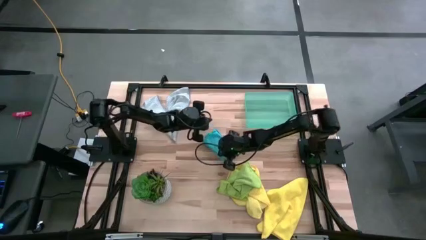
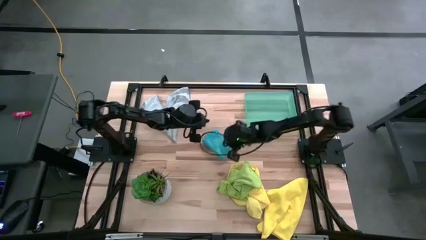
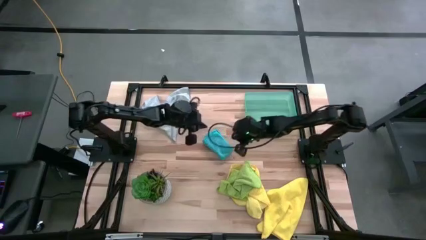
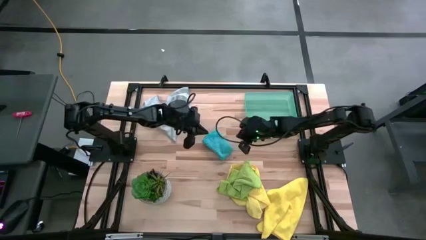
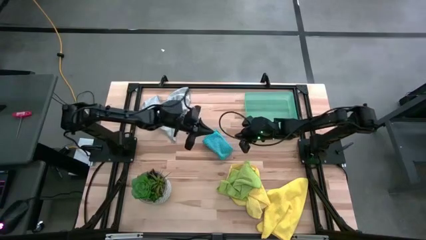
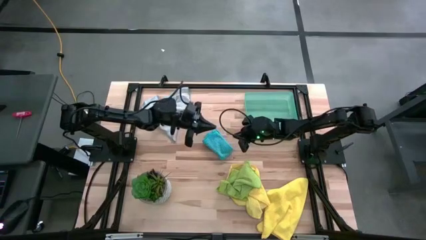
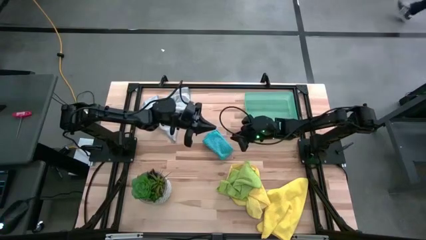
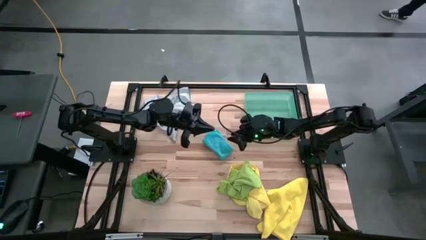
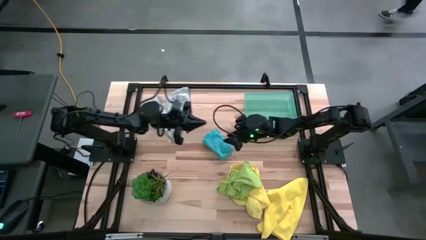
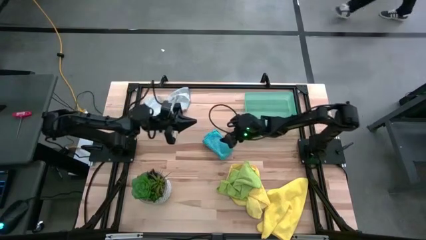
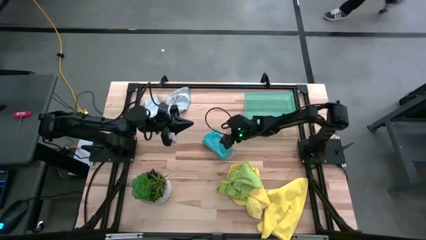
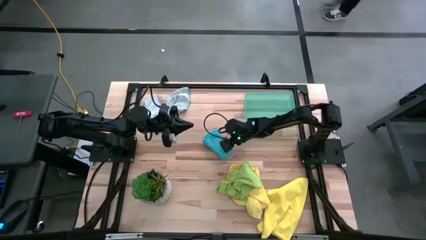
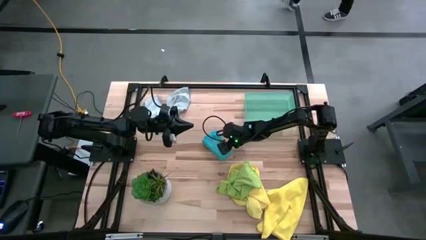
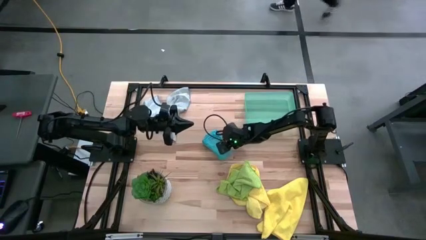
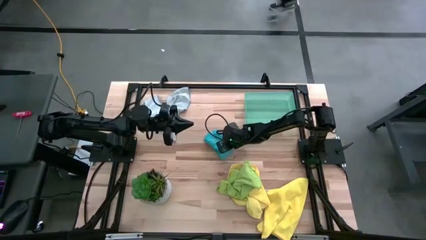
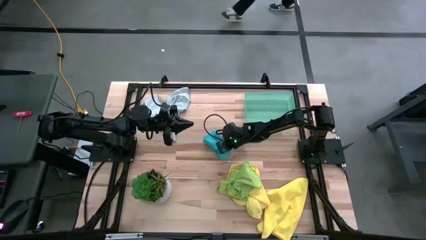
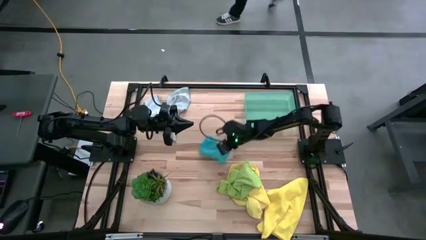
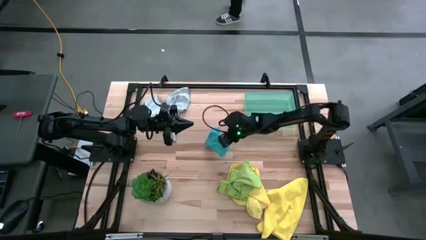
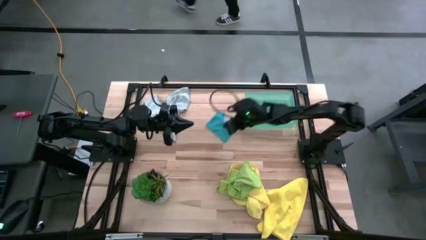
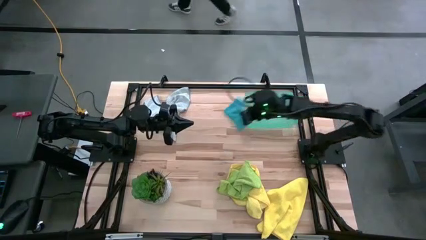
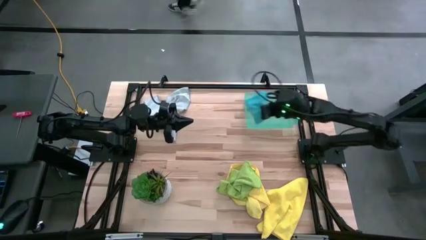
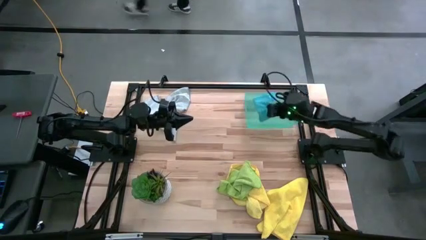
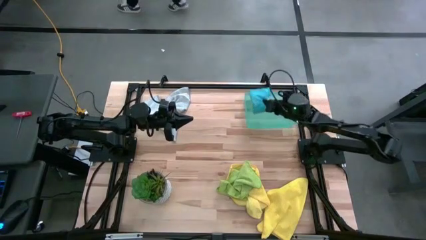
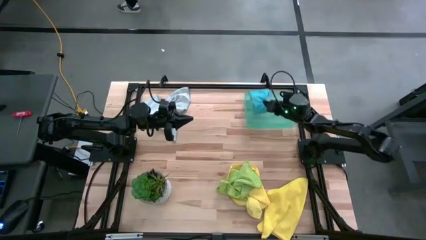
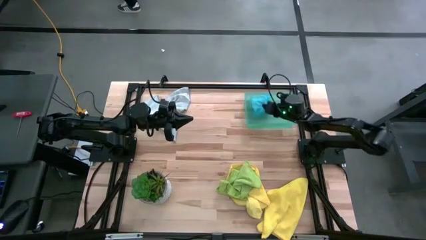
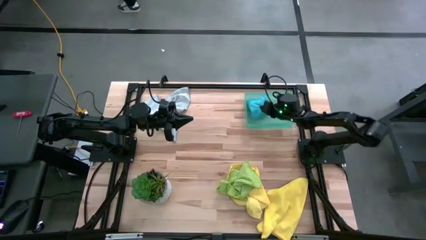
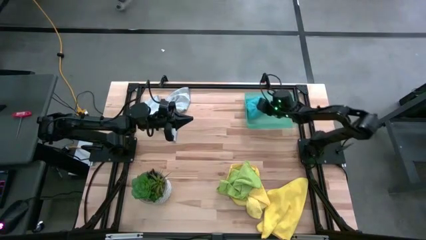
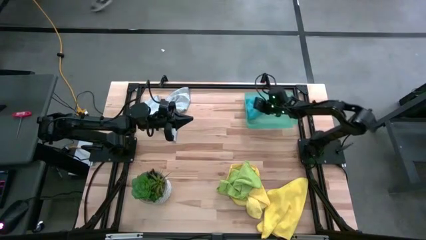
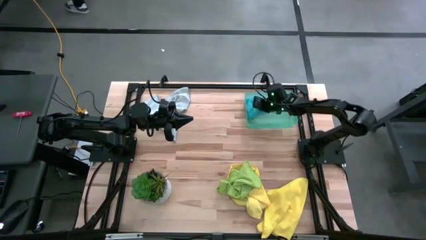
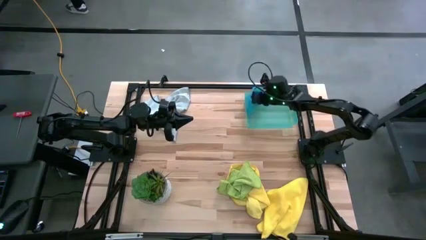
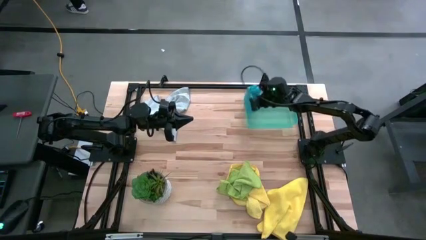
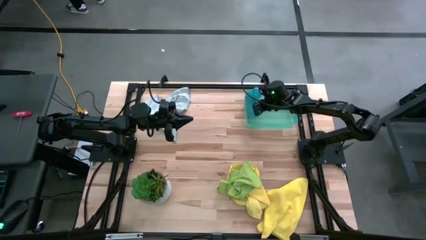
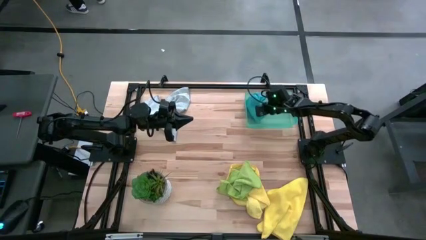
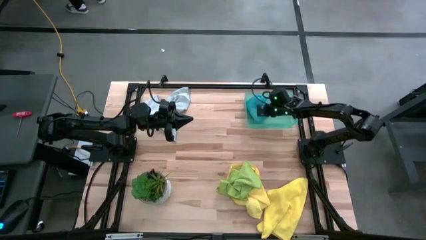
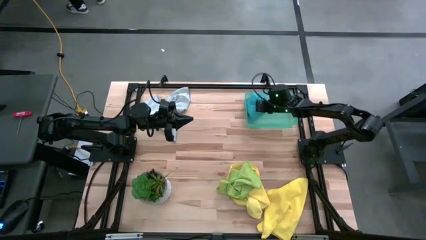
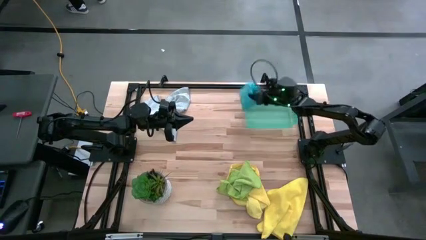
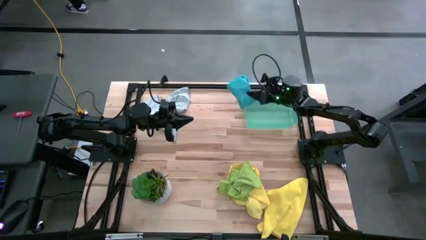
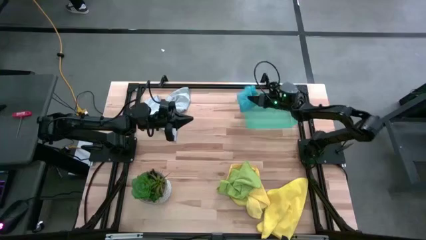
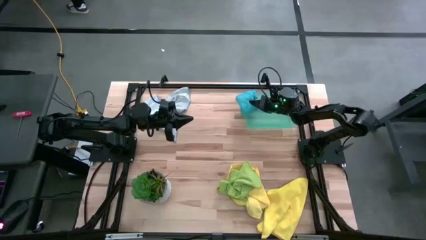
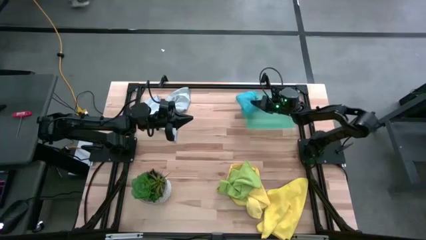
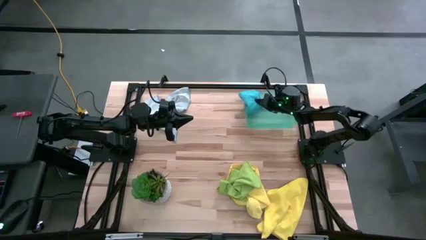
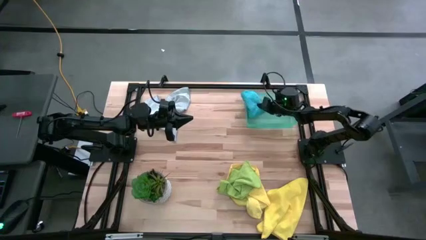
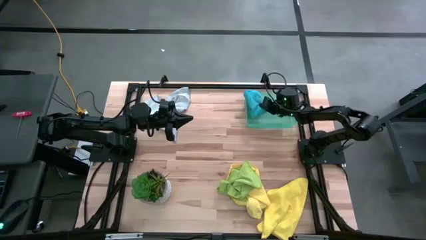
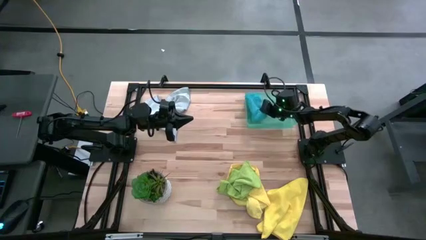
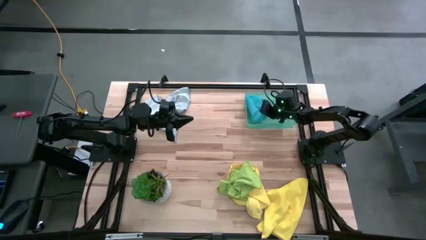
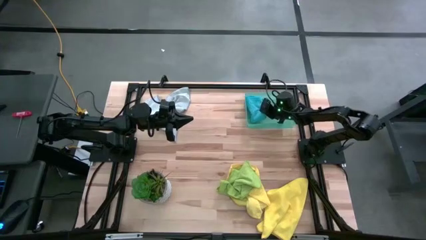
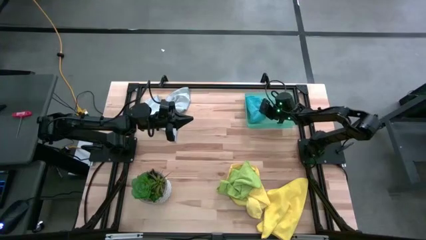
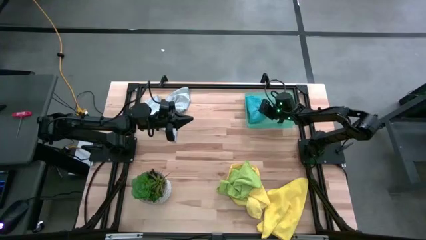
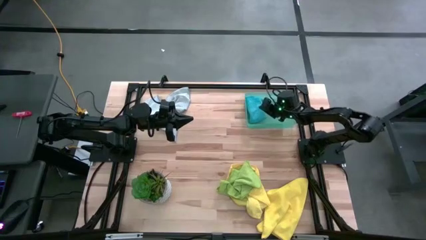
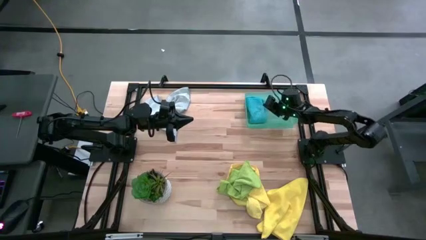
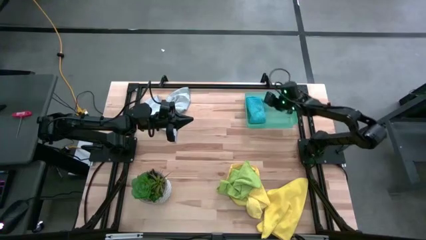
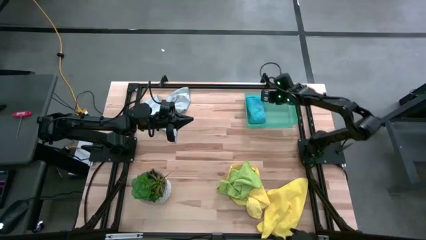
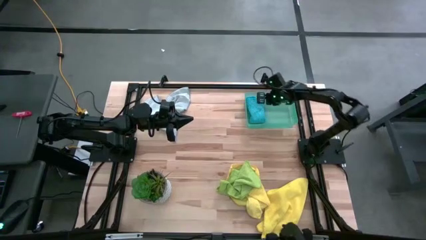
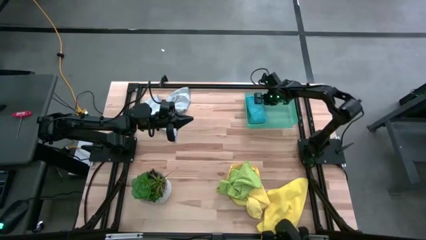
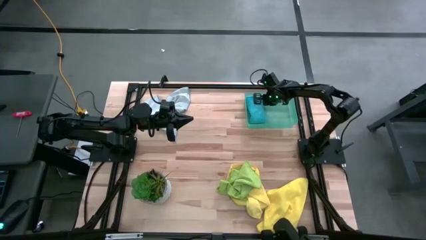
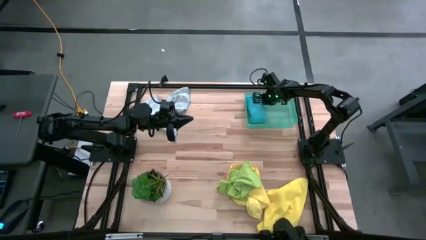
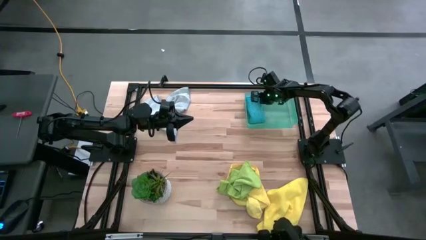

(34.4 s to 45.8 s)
Task: Fold microfiber towels
Put the blue towel into the green bin

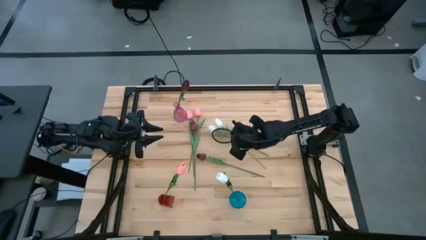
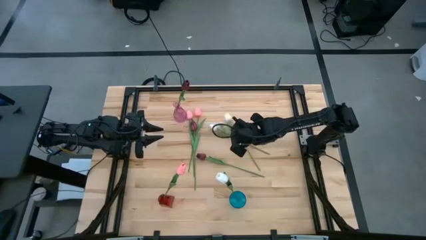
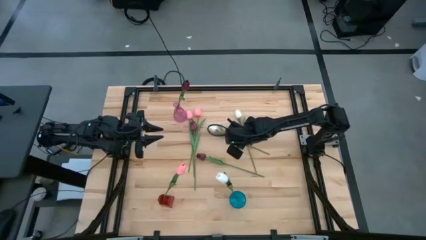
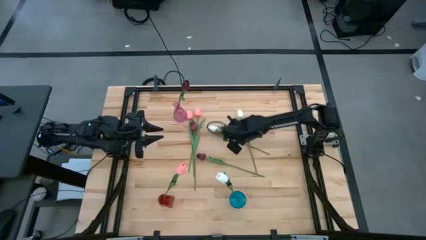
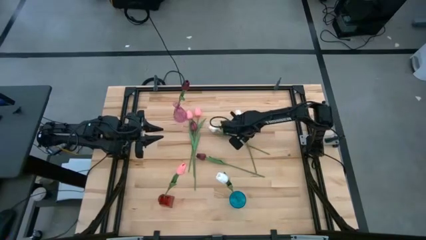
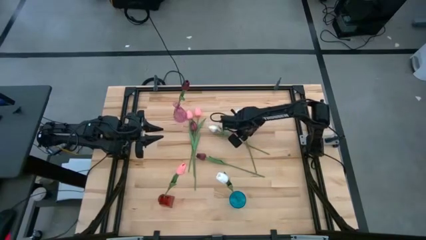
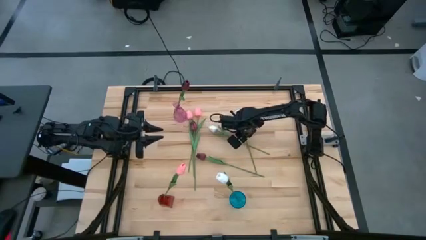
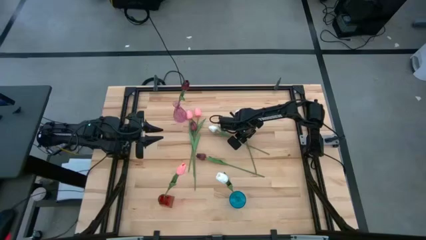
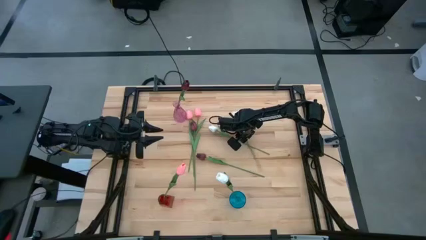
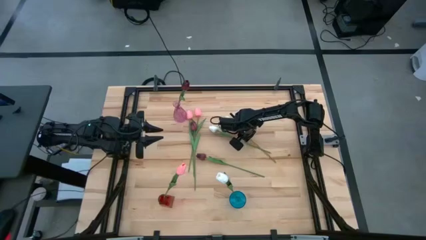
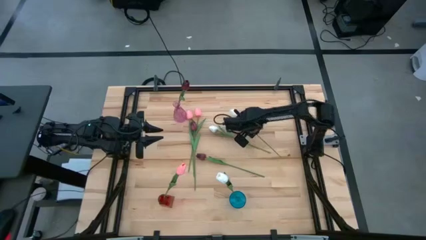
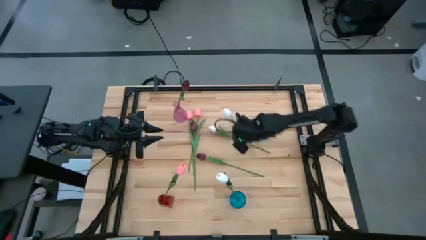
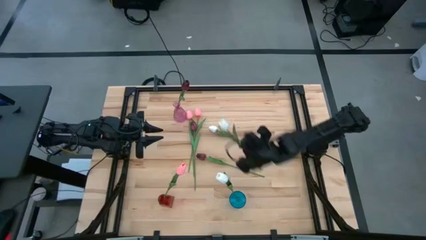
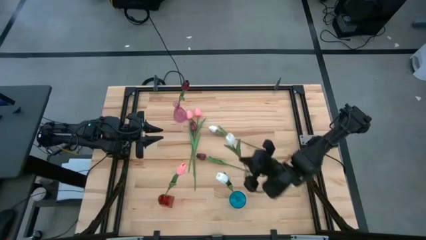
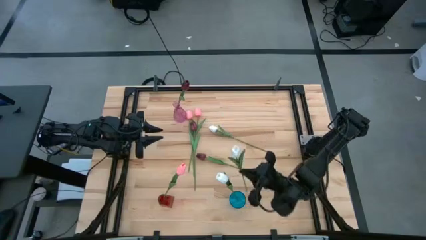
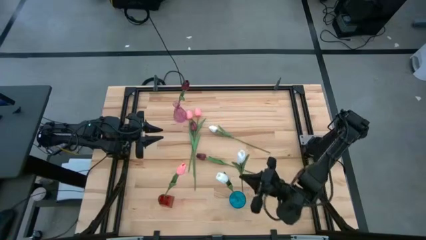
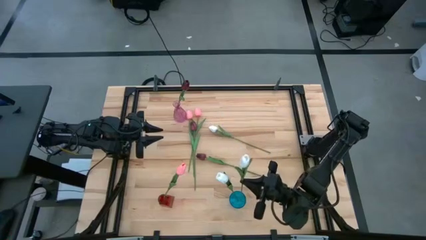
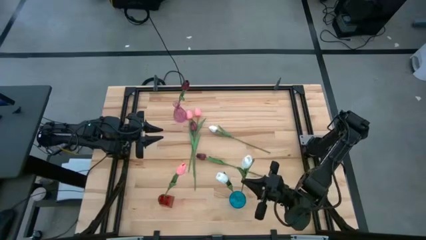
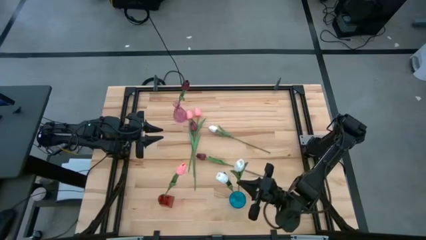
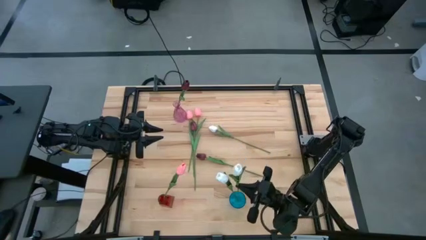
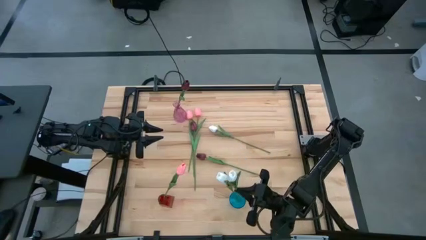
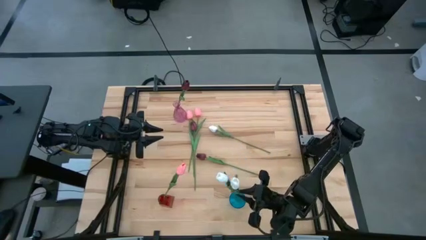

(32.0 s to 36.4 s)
Task: Sort flowers into vase by color
Put the right white flower into the blue vase

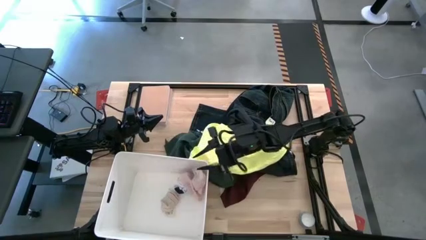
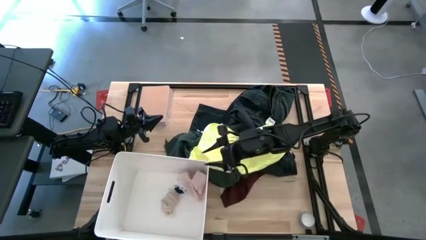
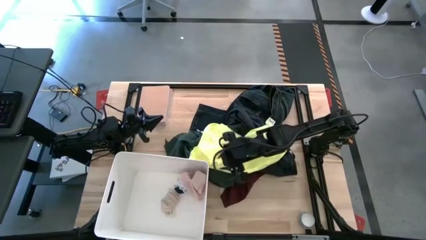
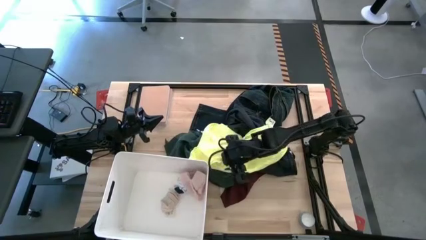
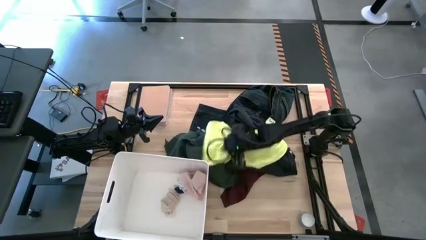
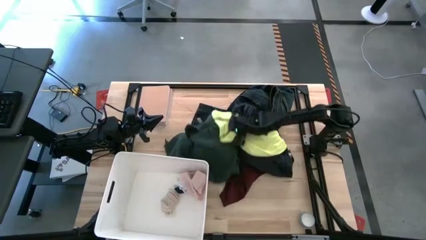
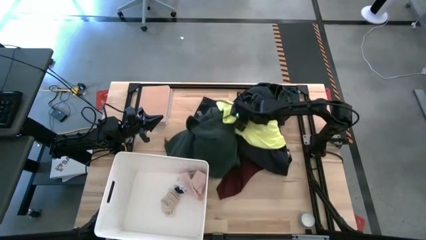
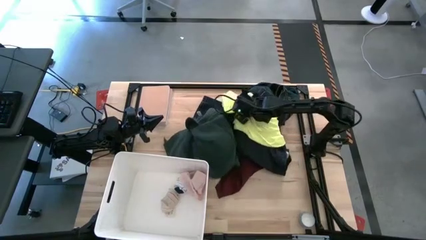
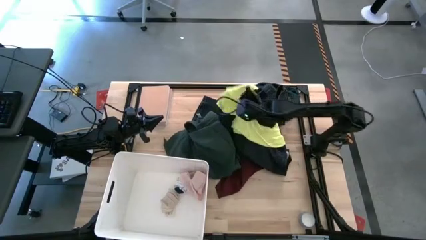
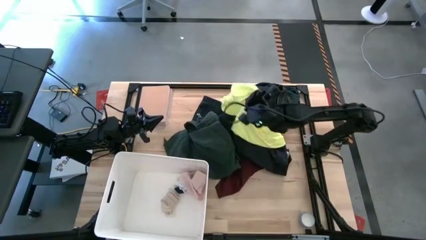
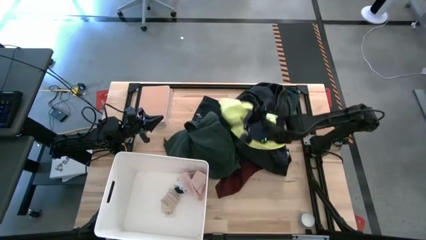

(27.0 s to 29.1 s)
Task: Sort clothes
Adjust the yellow shirt
